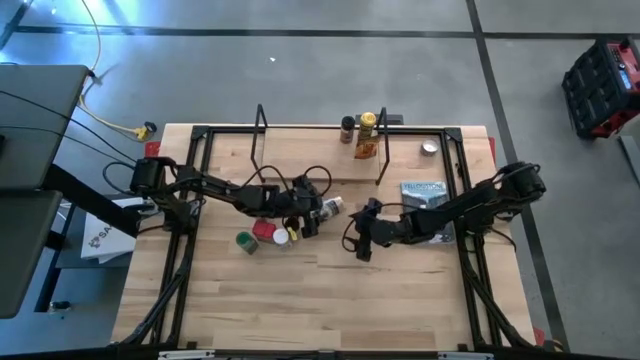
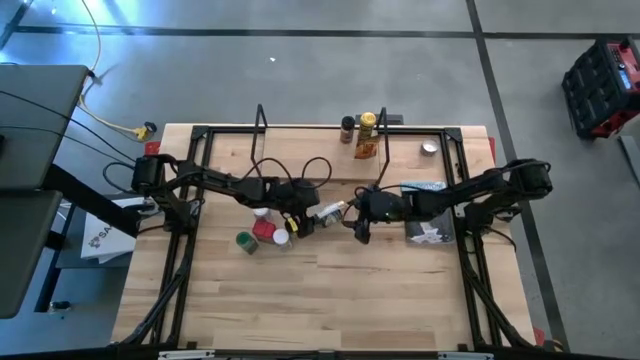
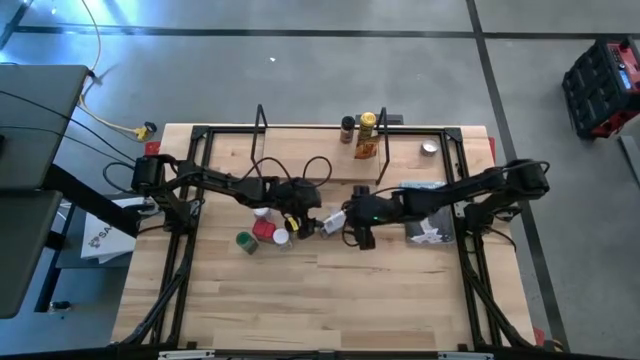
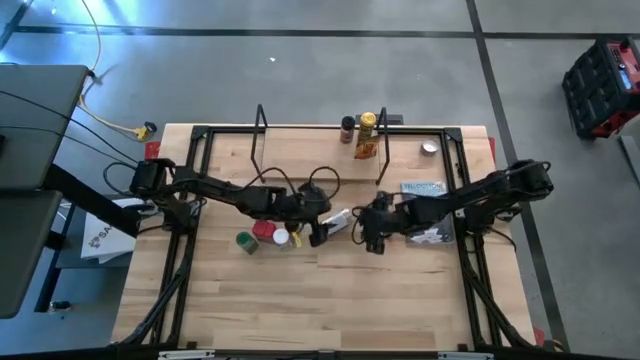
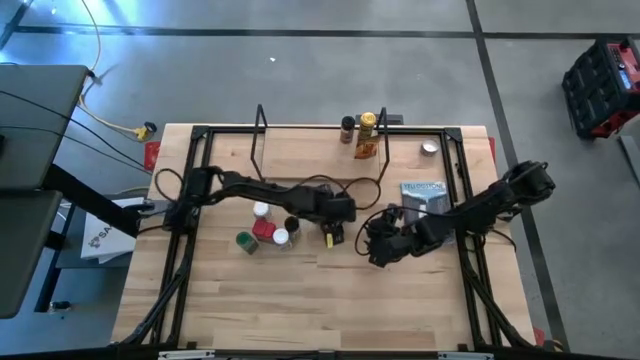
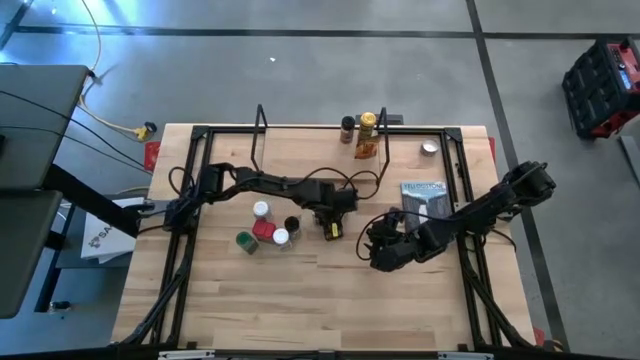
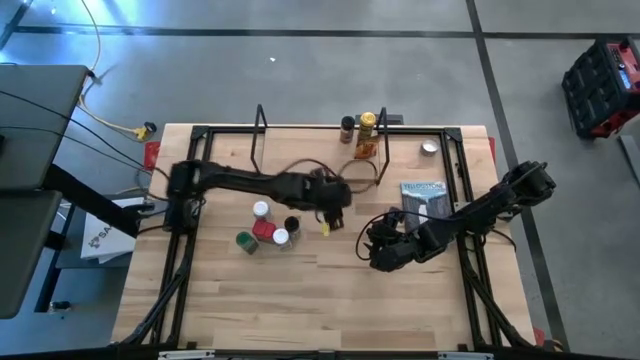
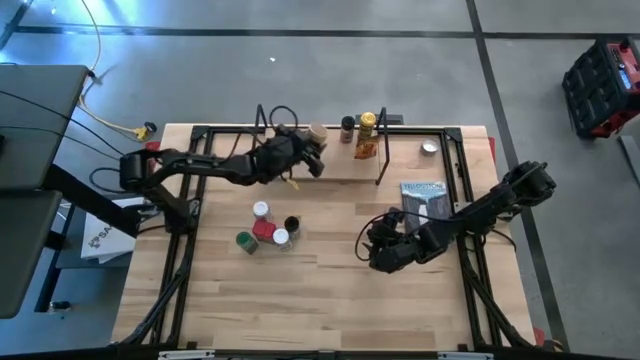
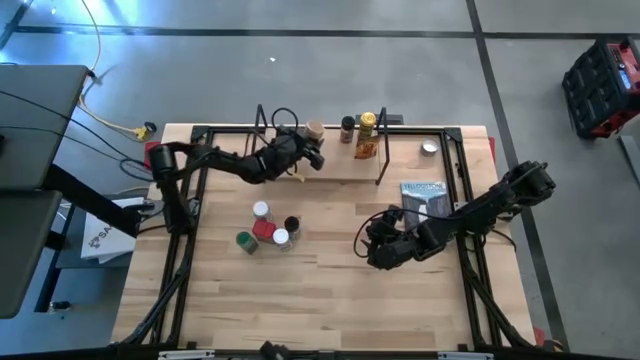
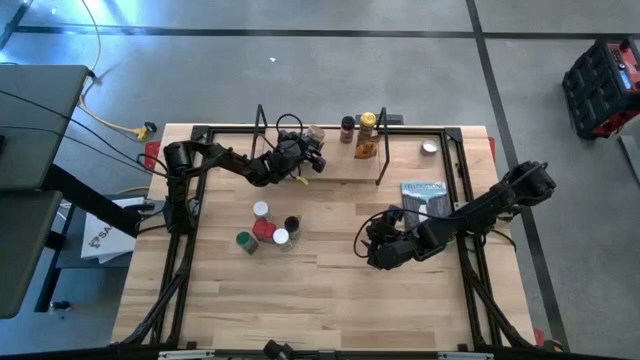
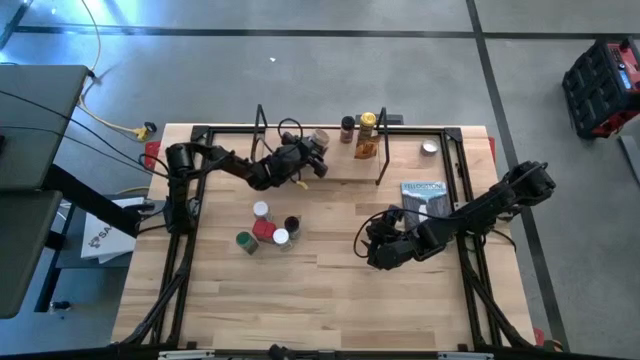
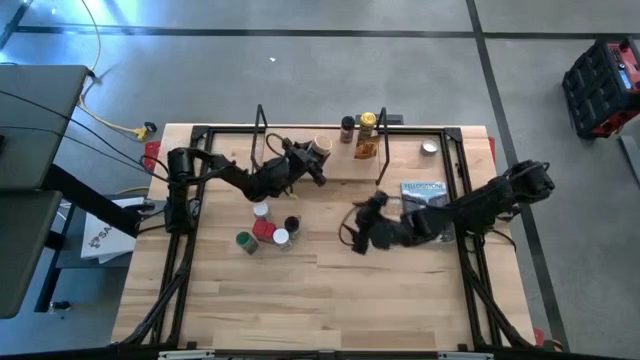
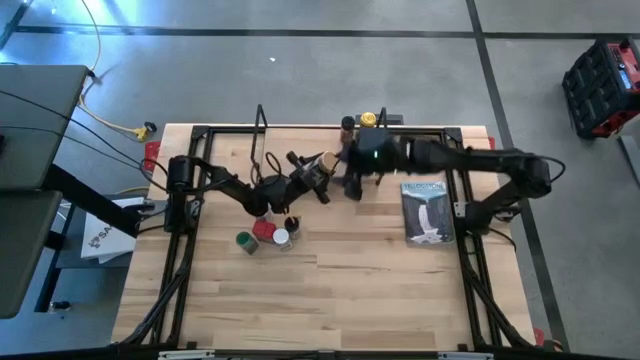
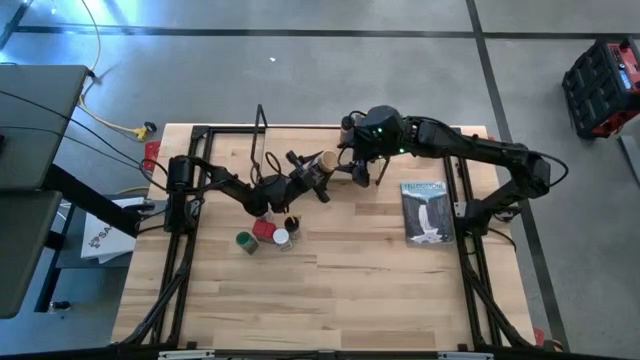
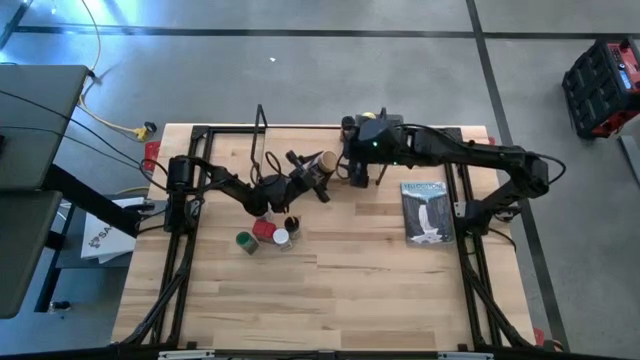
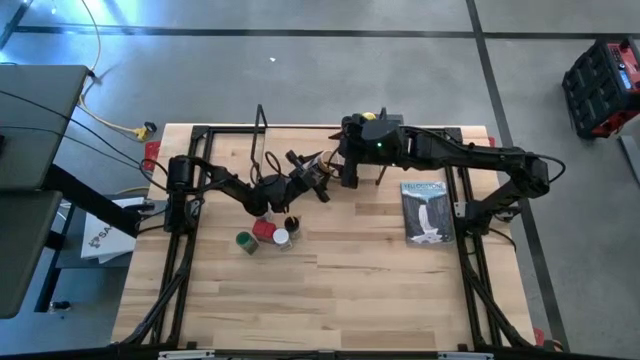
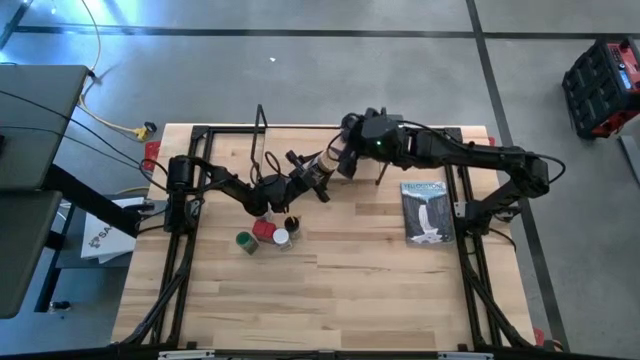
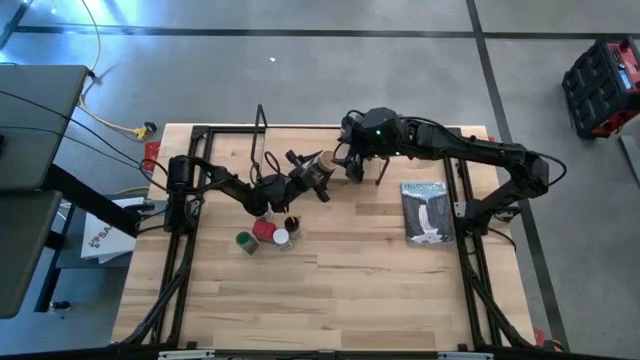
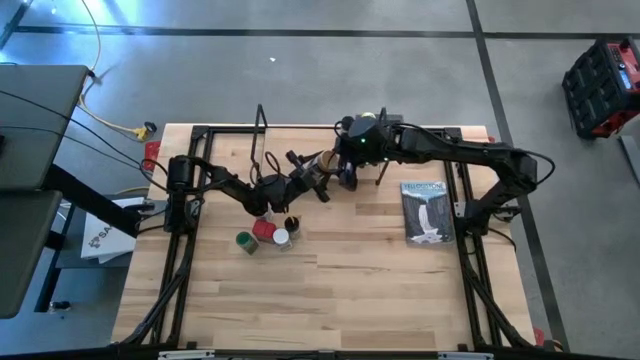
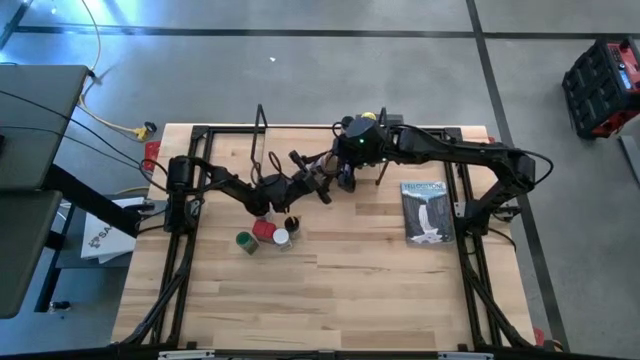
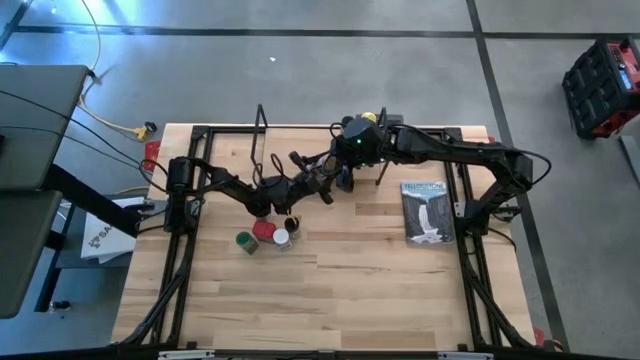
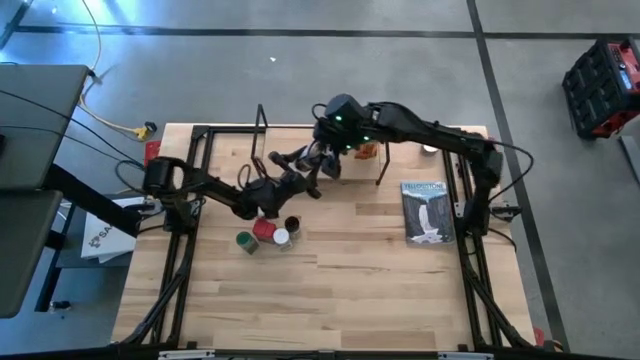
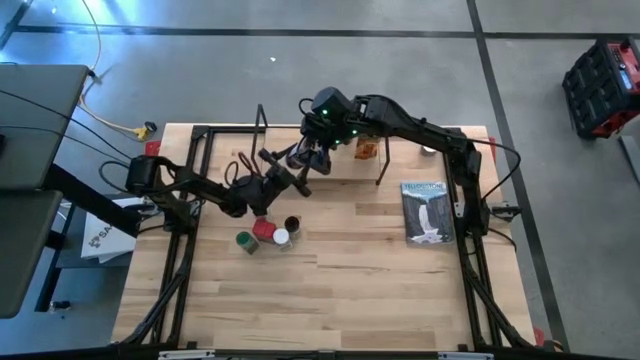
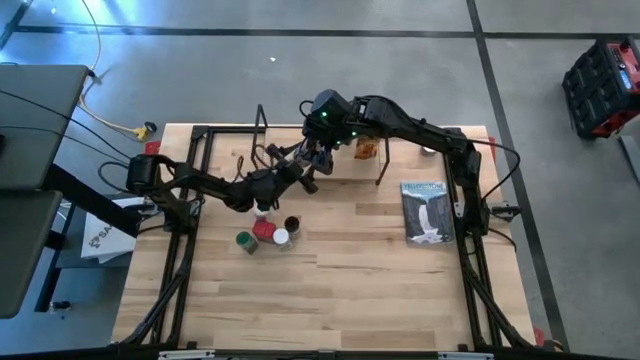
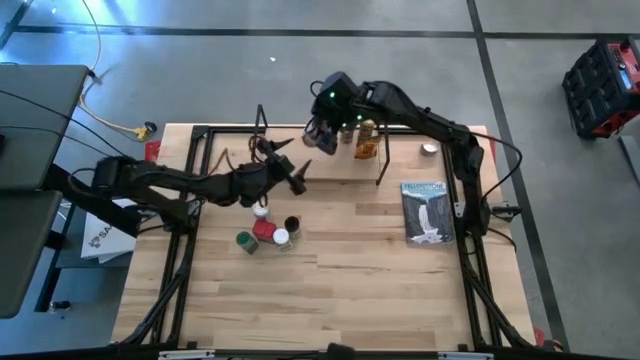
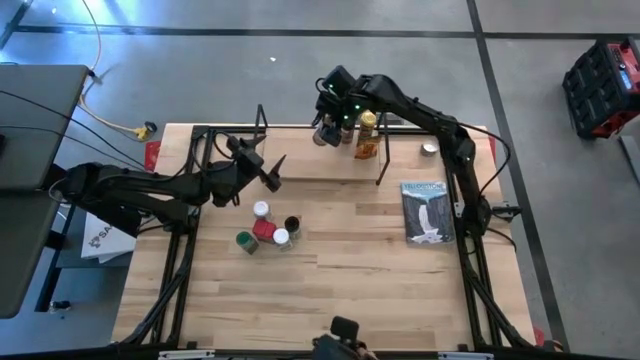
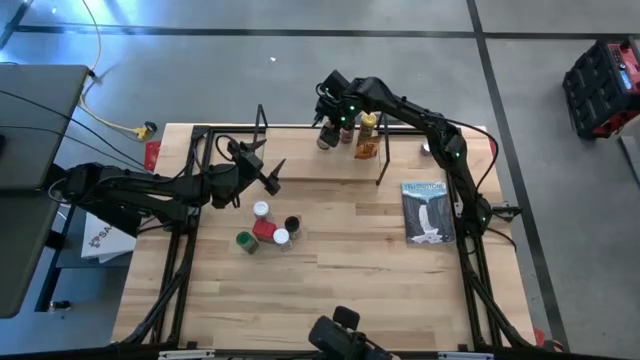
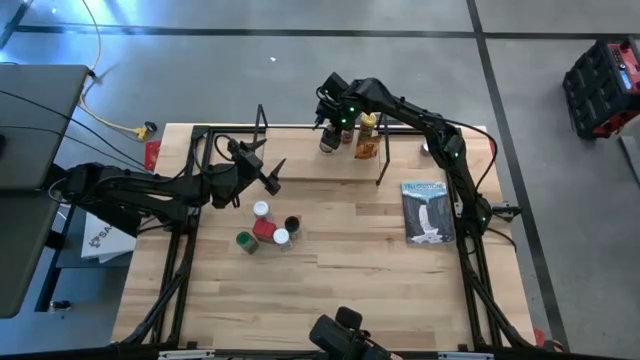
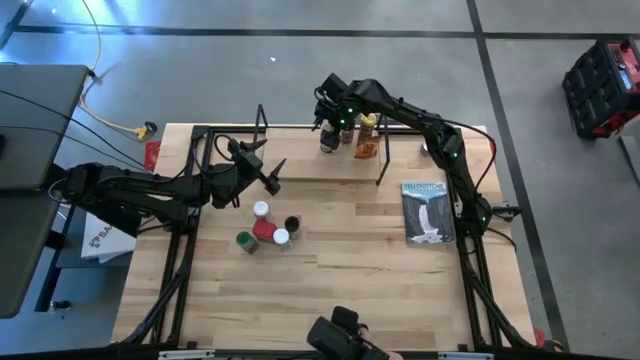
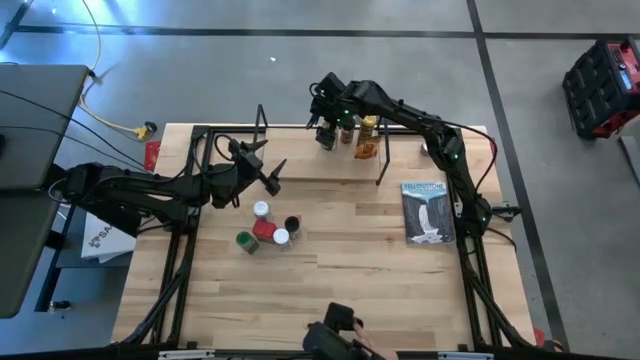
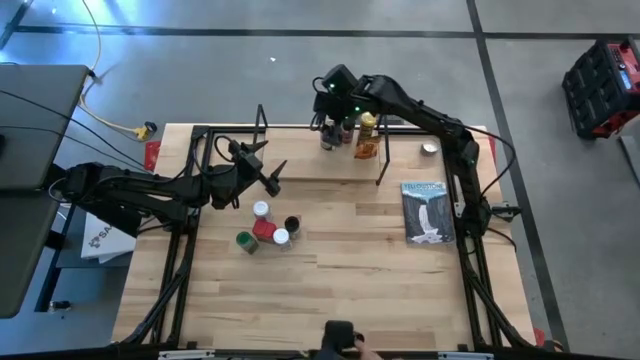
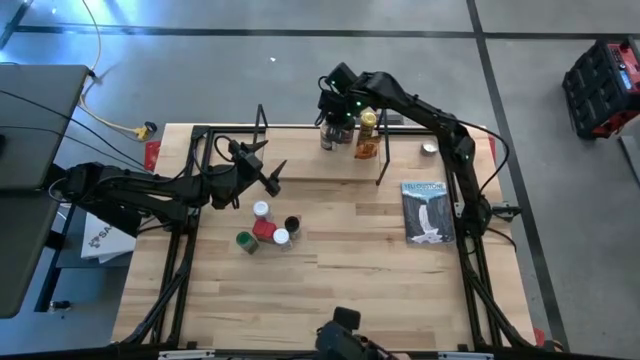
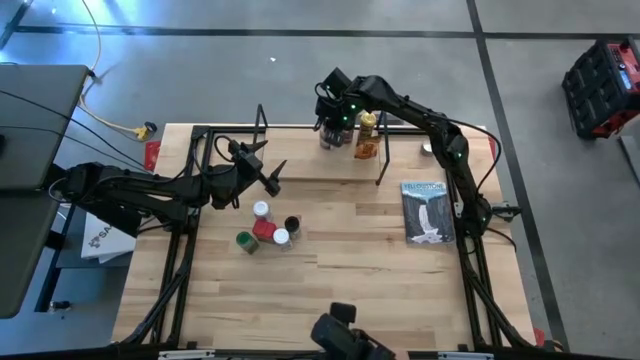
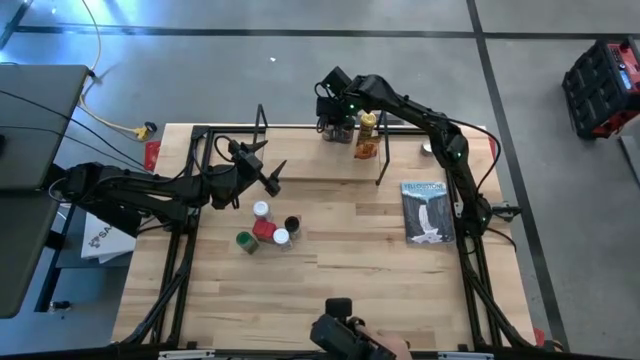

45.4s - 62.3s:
Task: Shelf spices
Put the gold seasoning bottle on the shelf

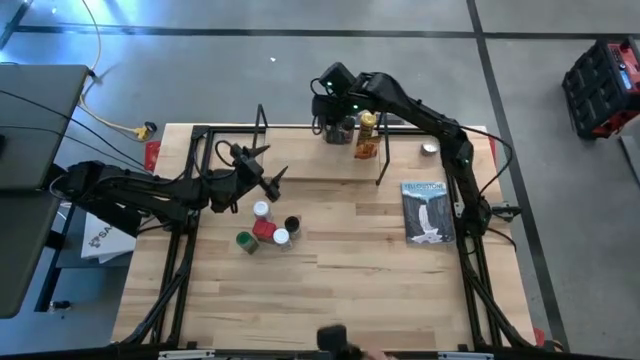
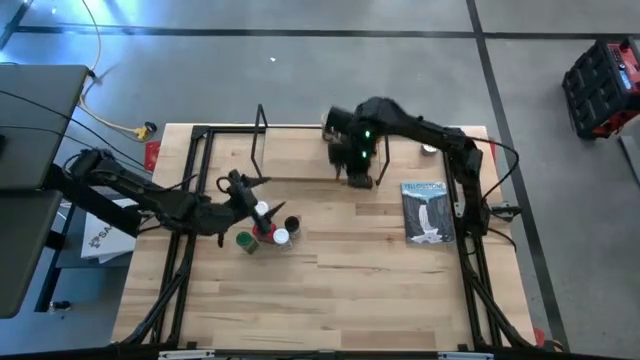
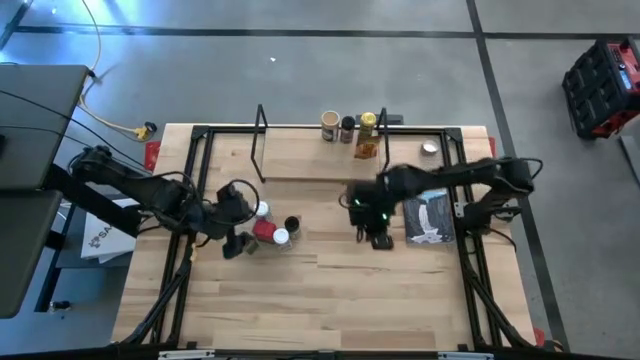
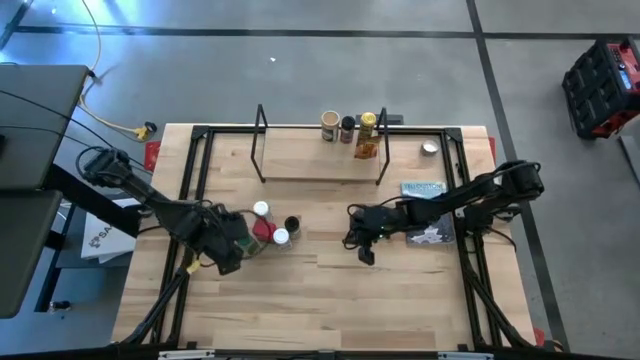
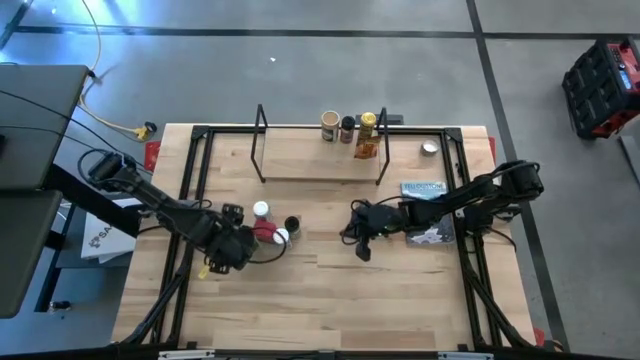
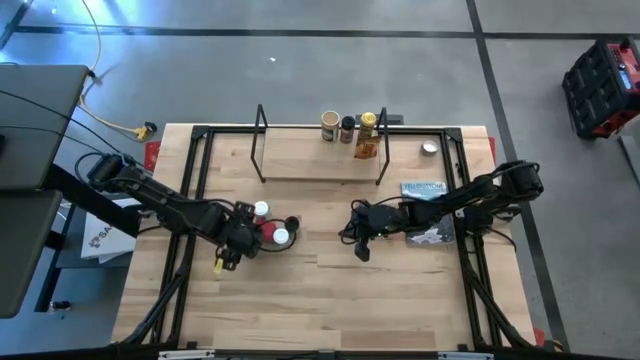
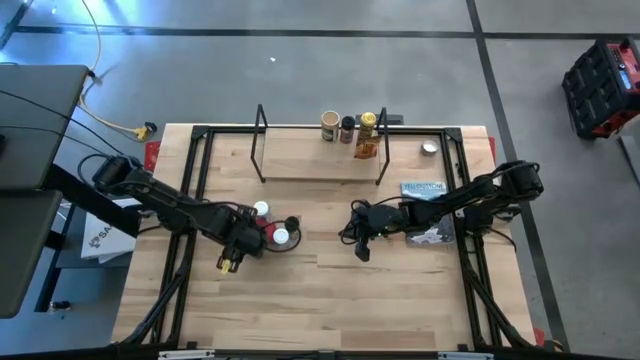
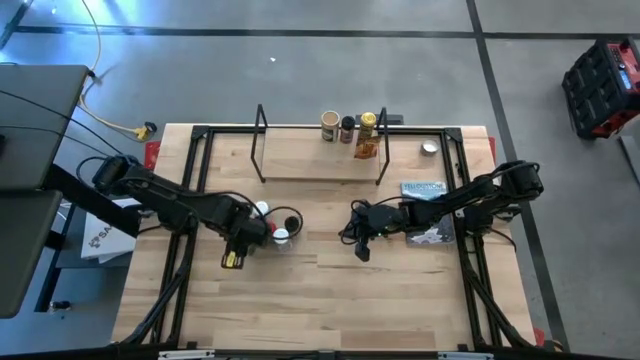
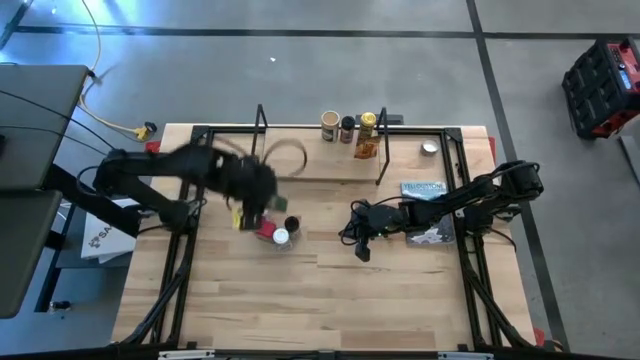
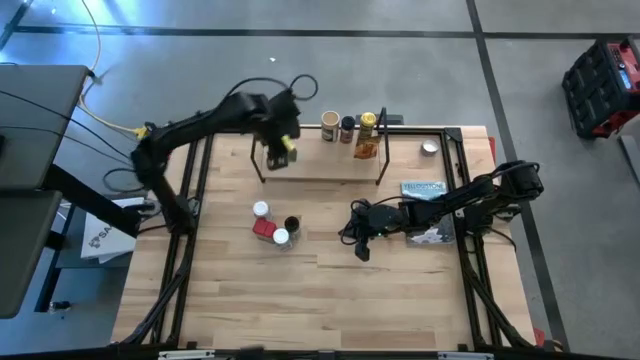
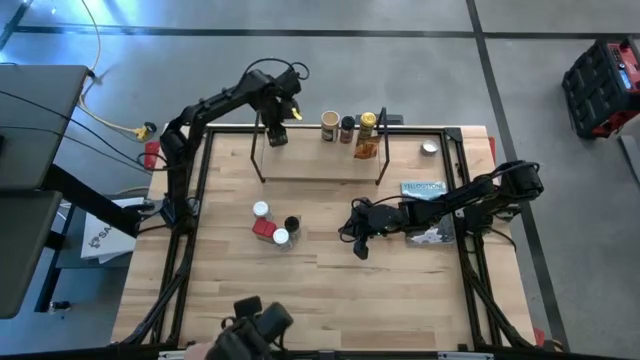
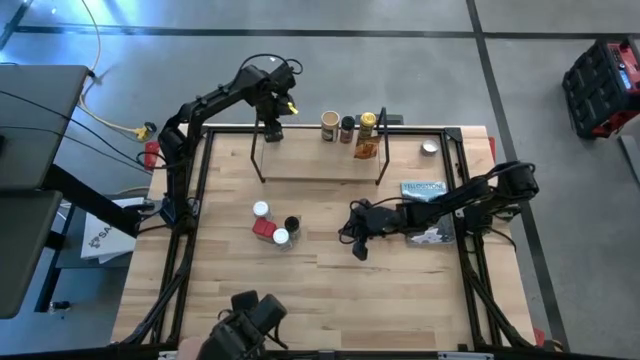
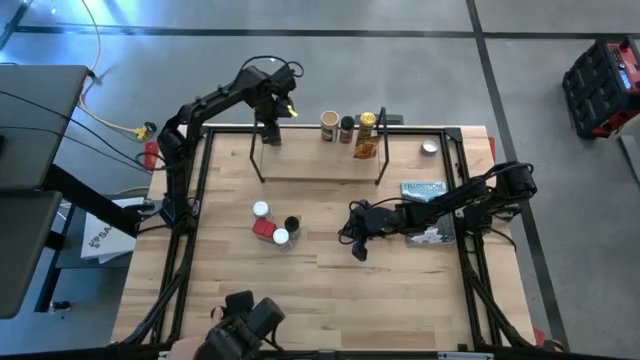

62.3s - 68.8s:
Put the green seasoning bottle on the shelf
